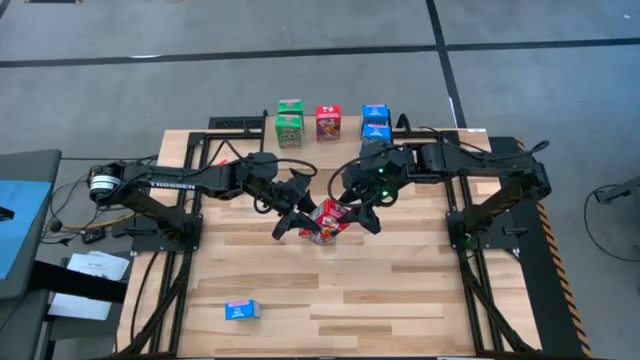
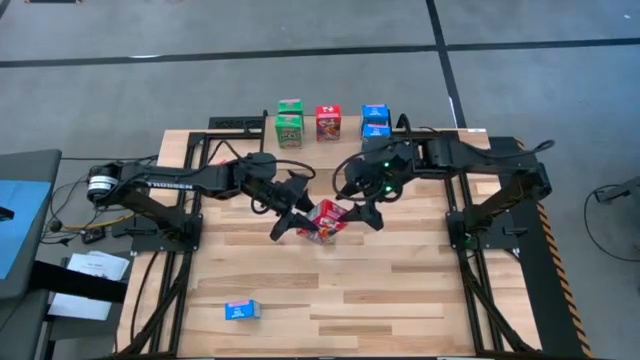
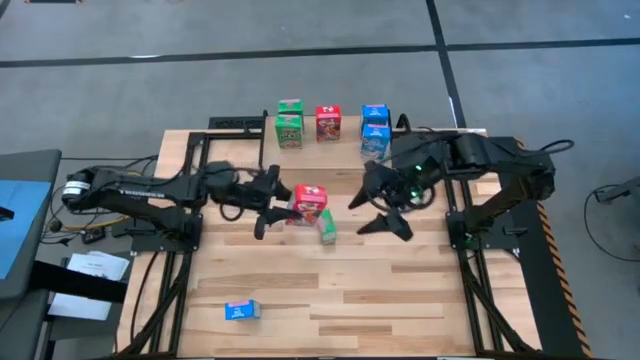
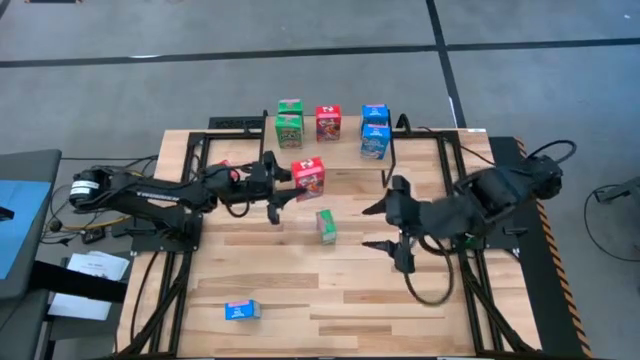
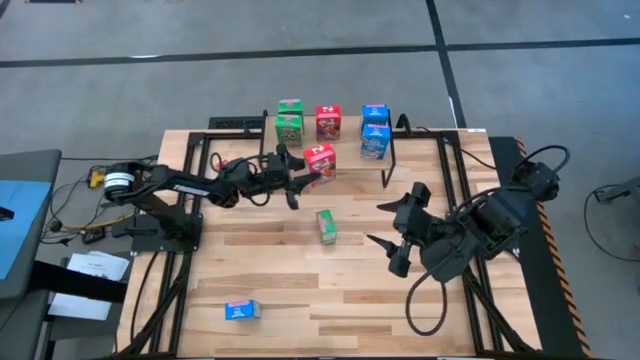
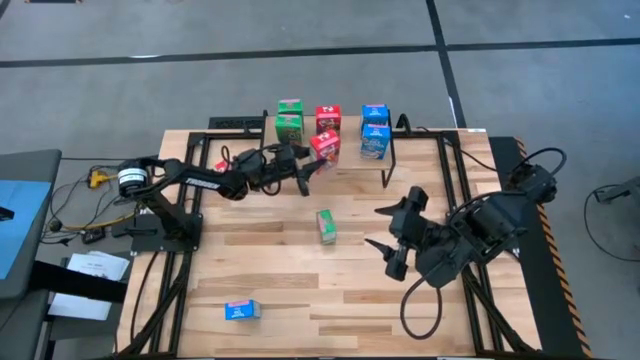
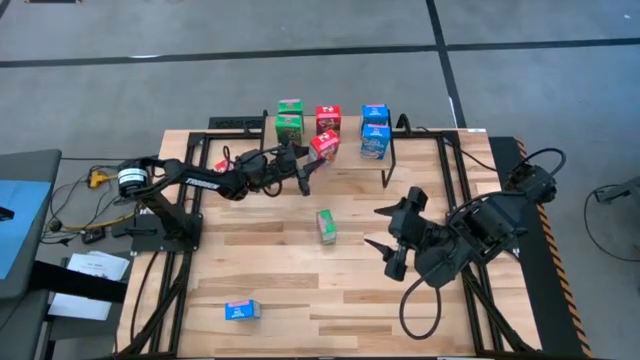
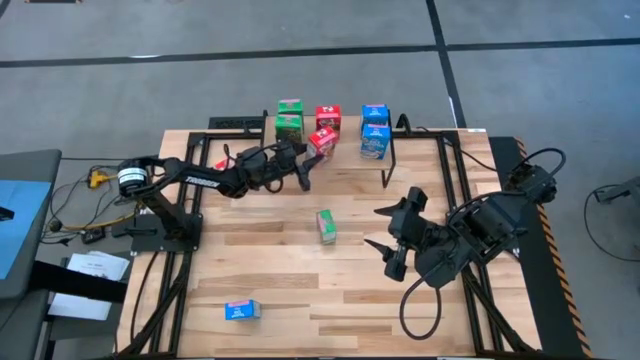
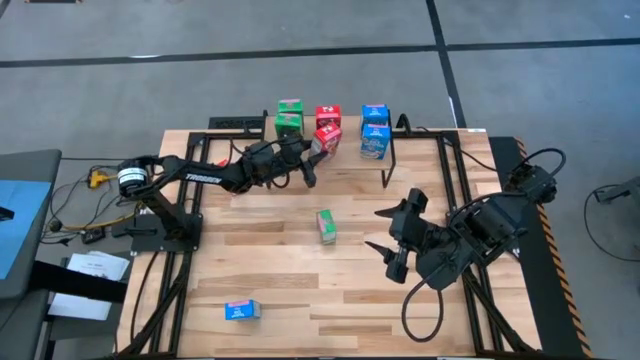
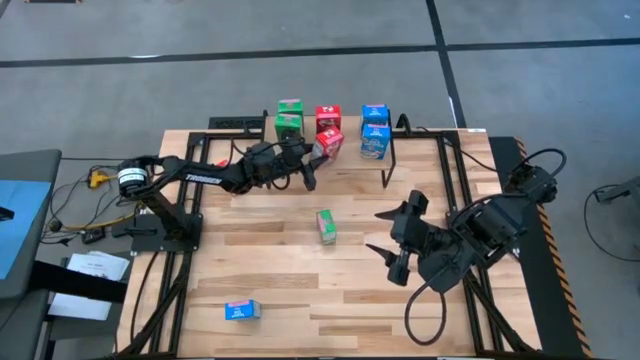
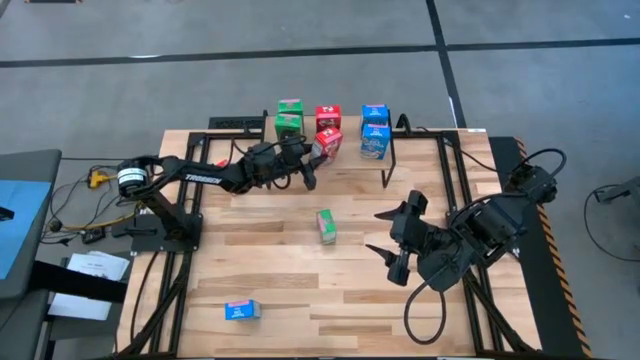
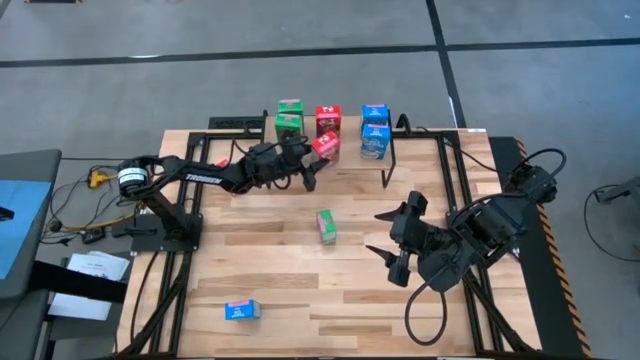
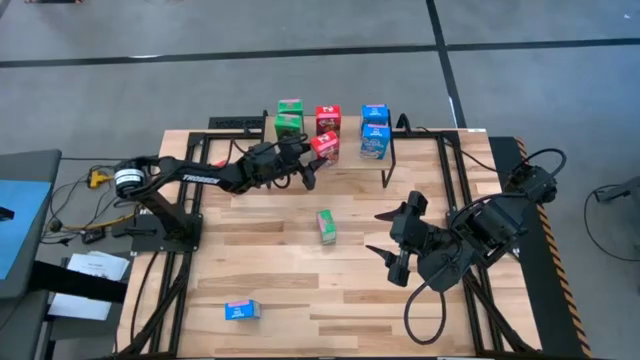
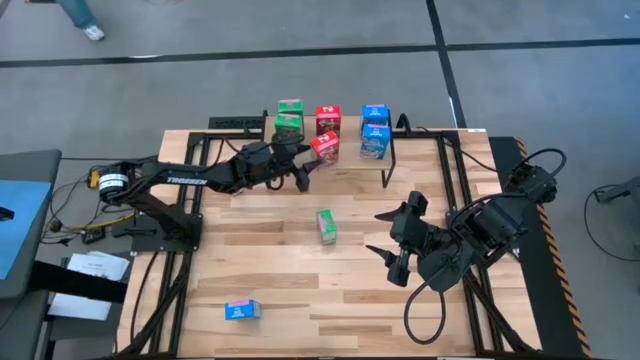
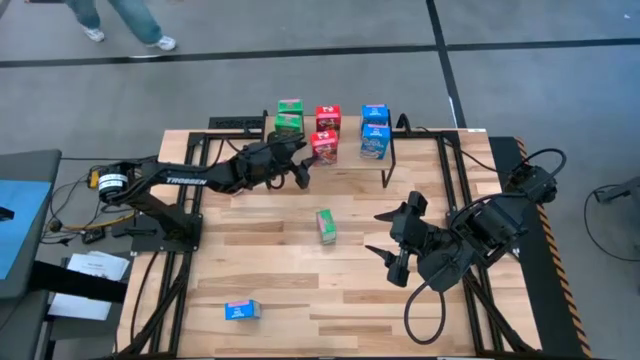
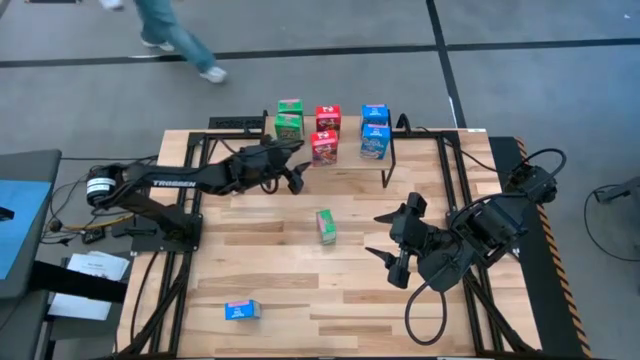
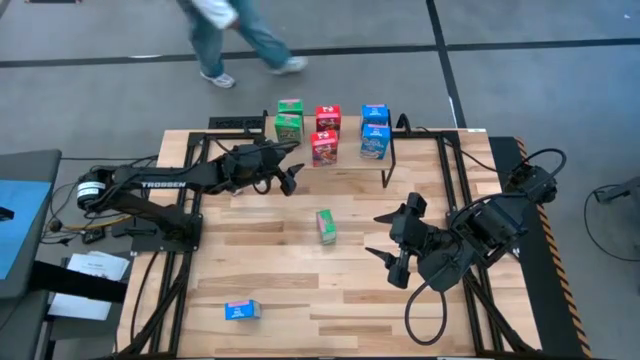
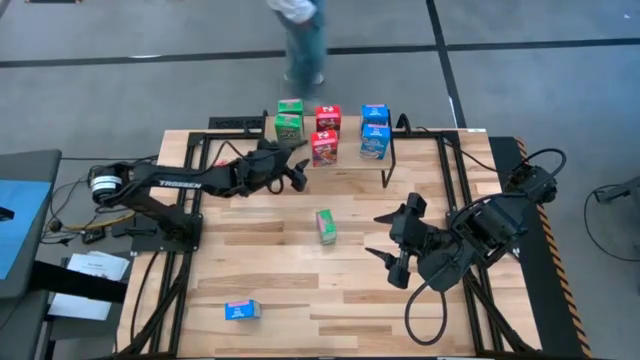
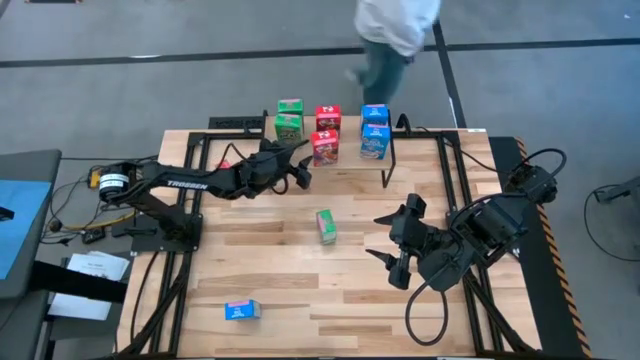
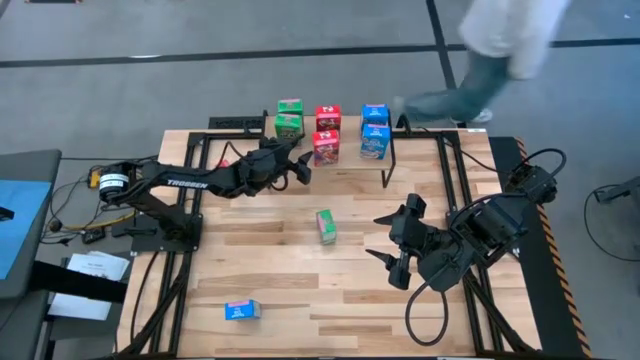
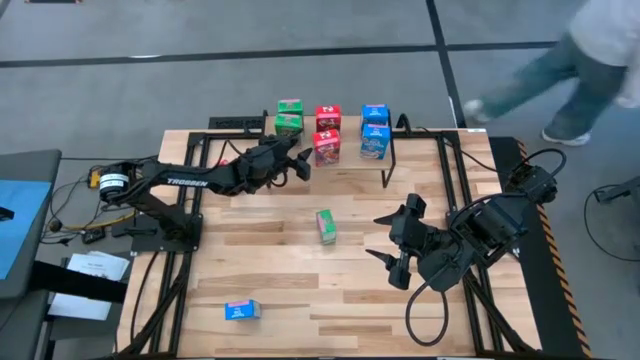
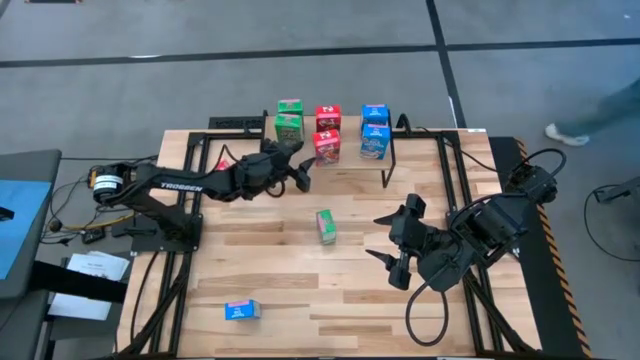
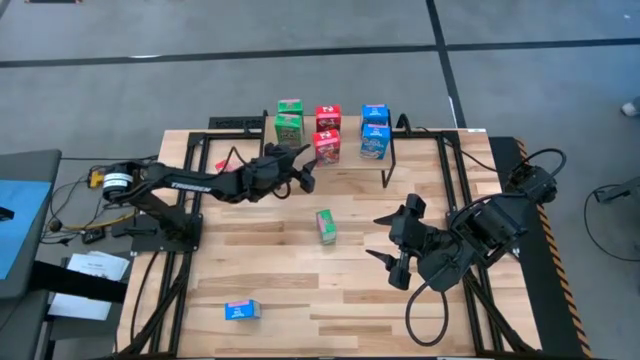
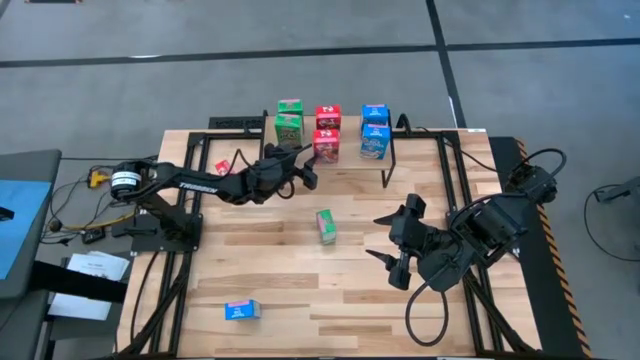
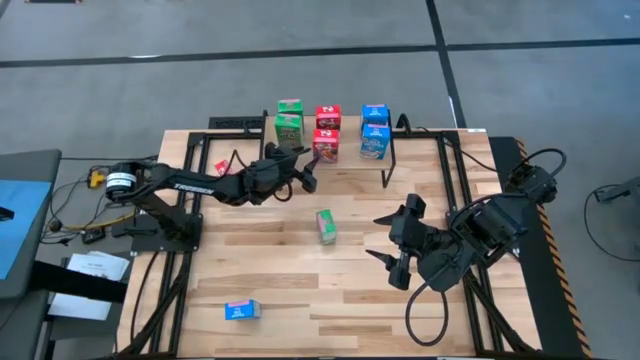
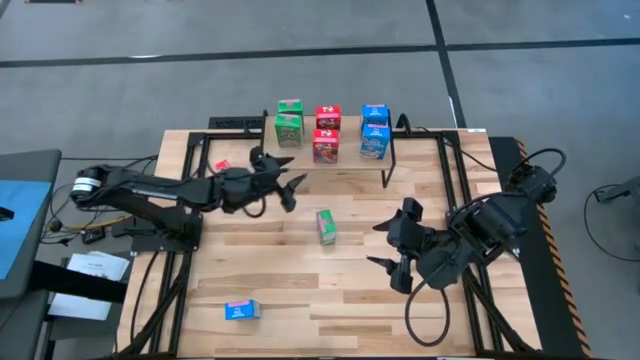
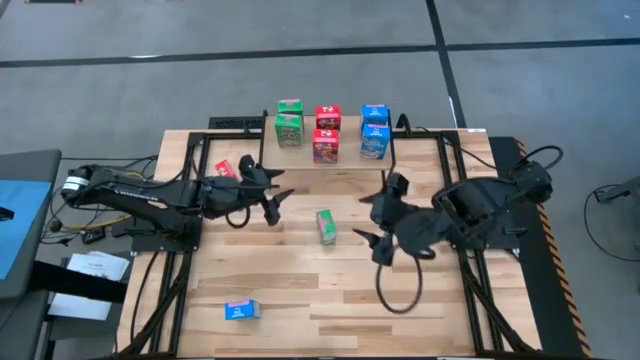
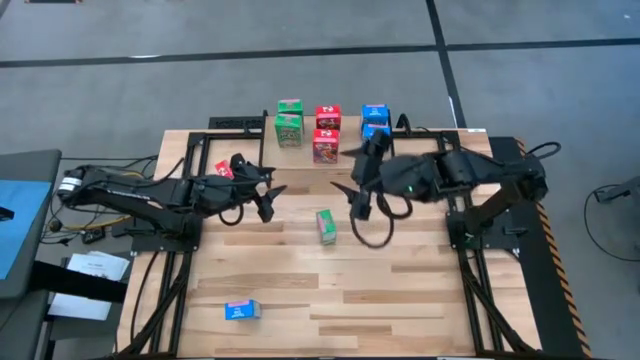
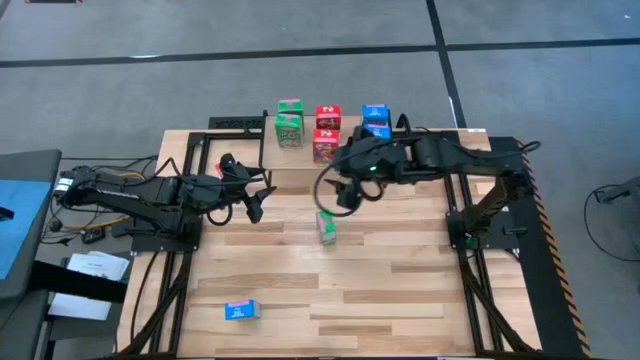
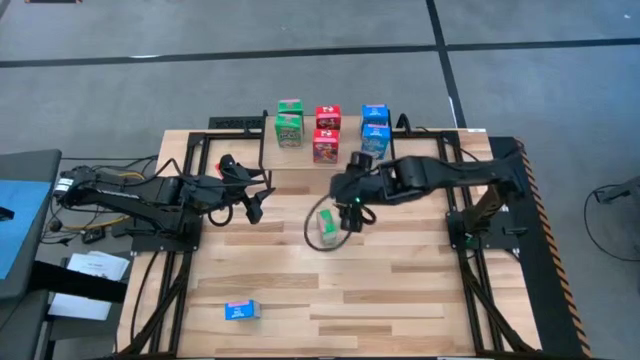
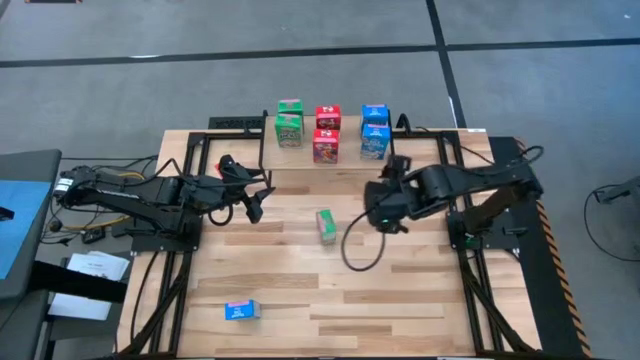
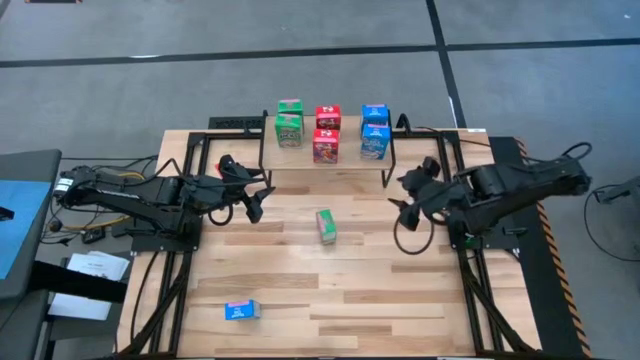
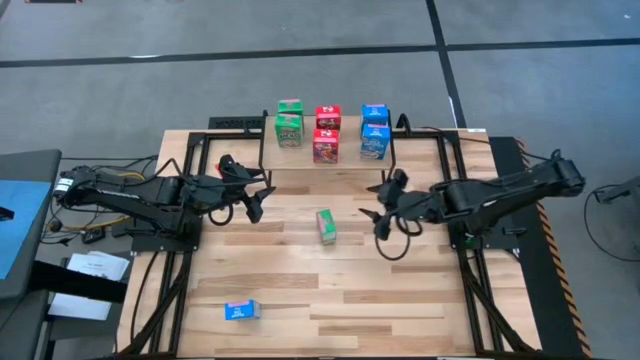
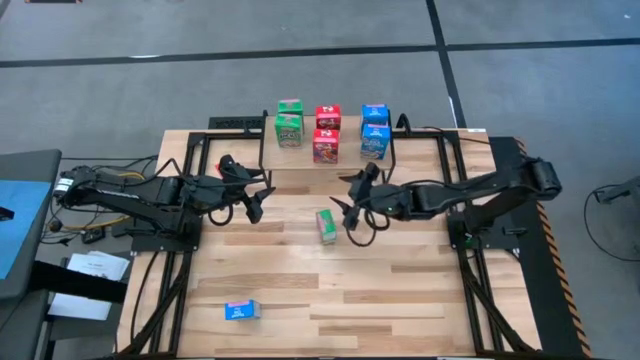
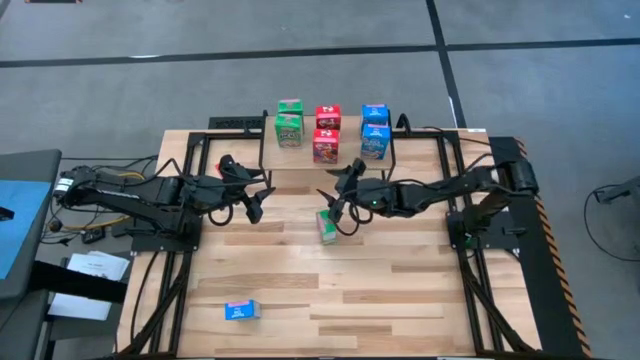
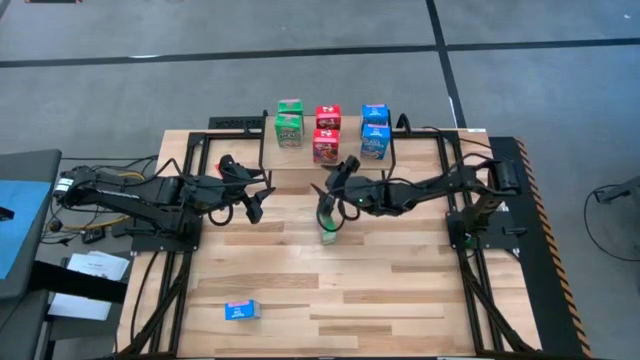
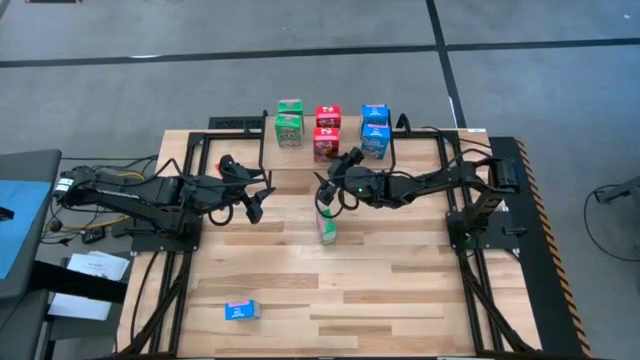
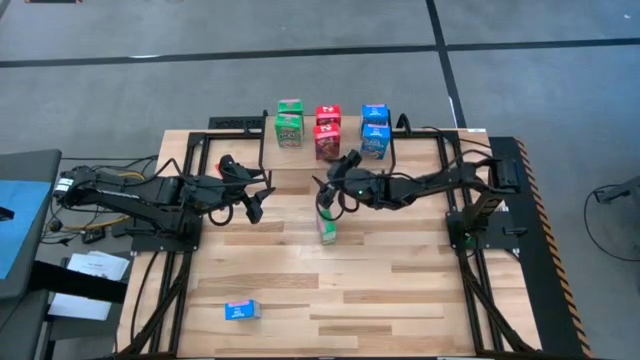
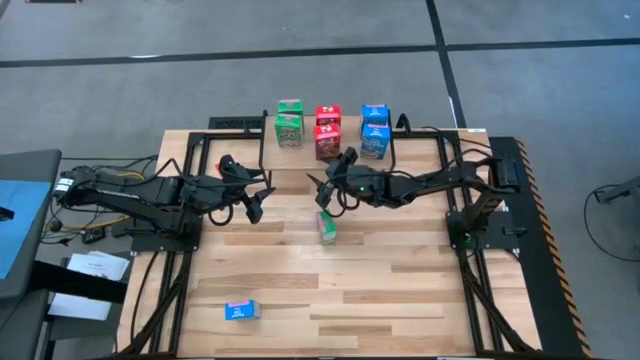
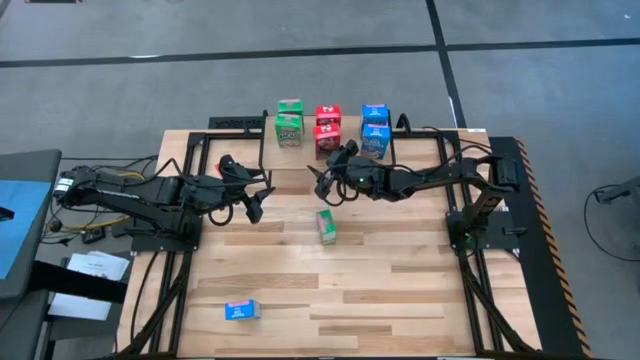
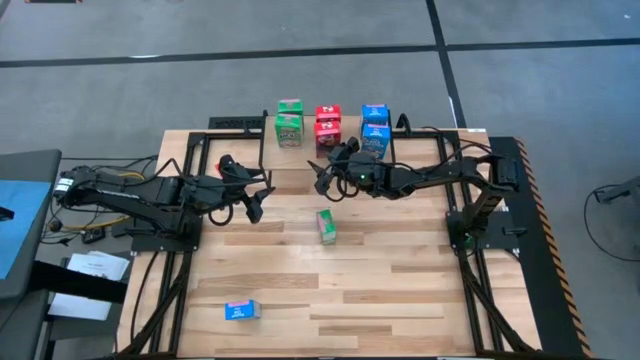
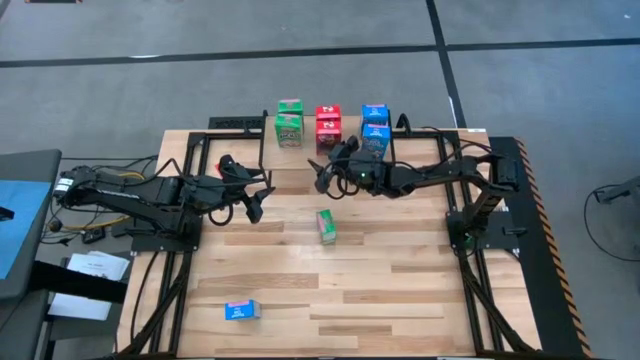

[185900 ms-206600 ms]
Task: Stack cereal on shelf
Put the bottom red cereal box on the shelf aligned with the other red cereal box
